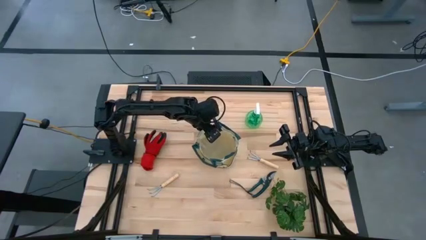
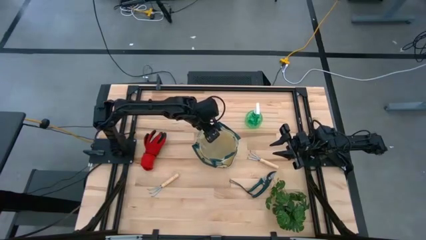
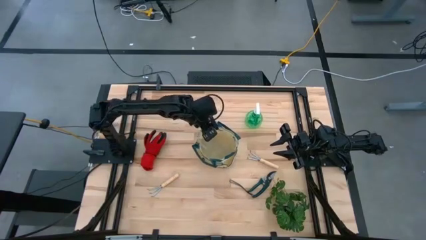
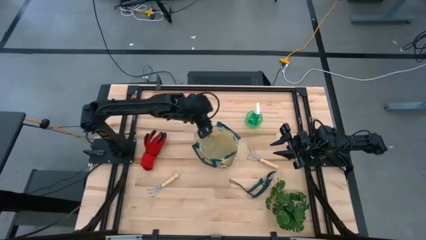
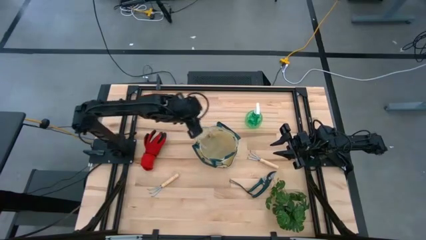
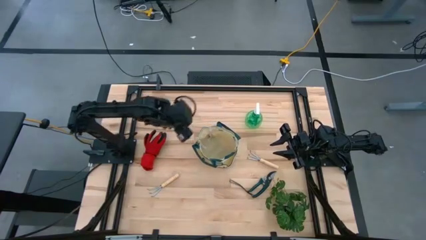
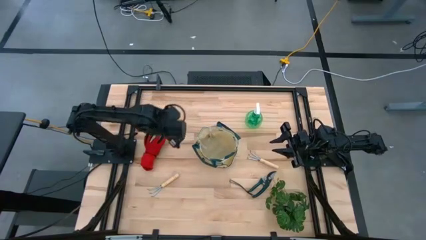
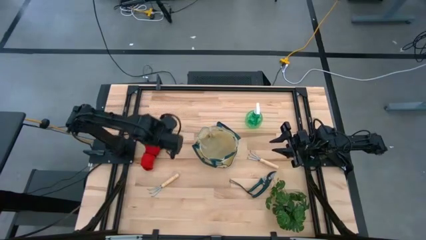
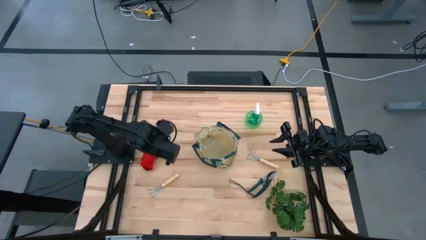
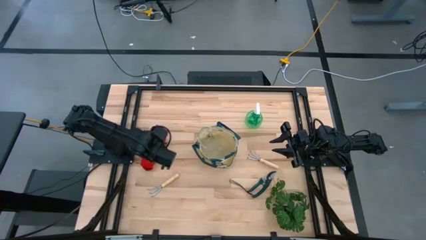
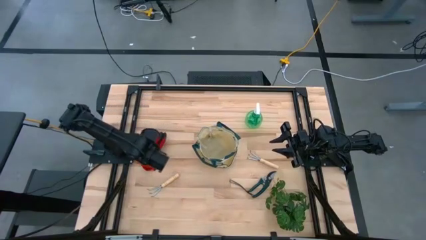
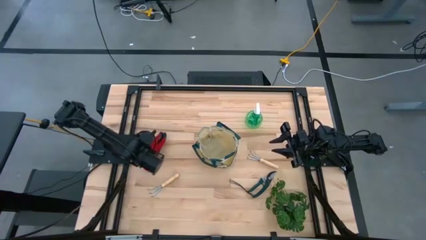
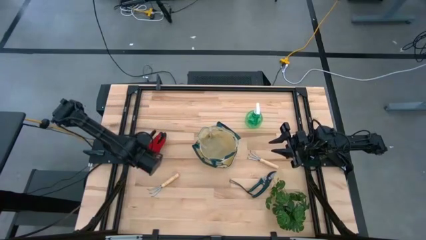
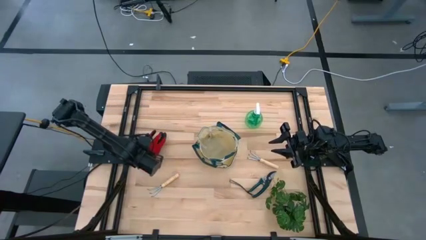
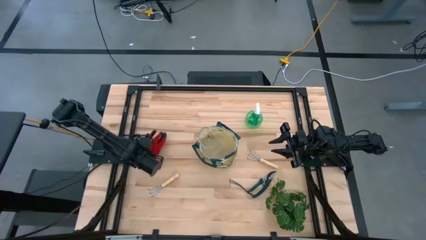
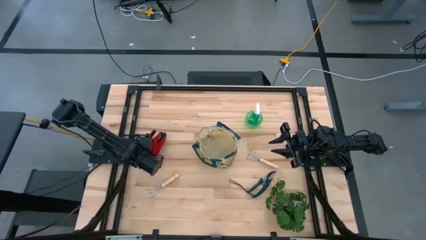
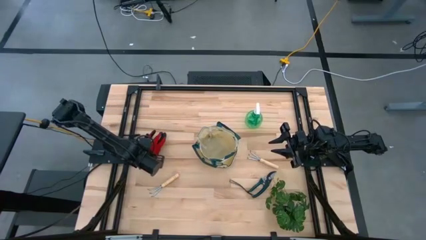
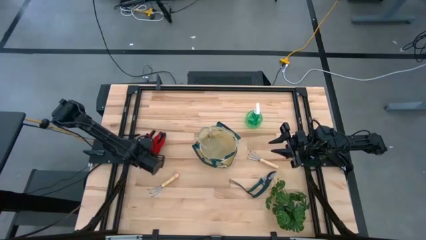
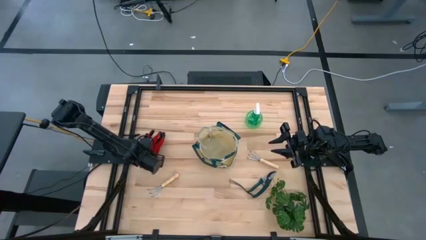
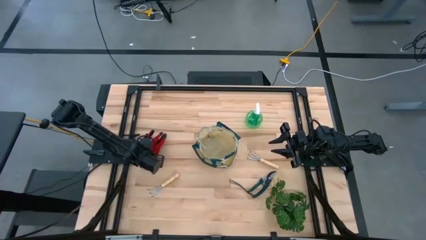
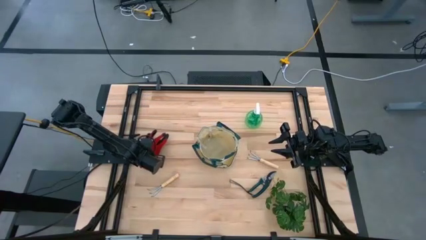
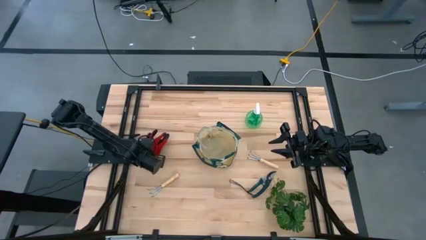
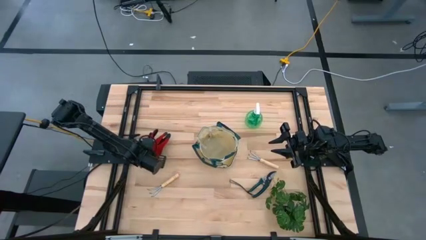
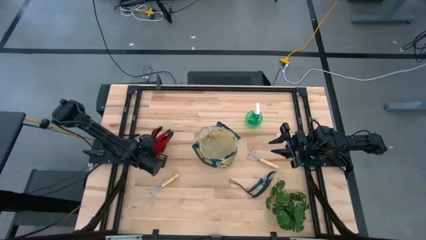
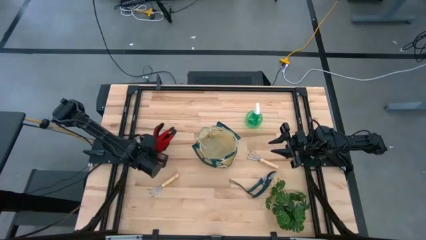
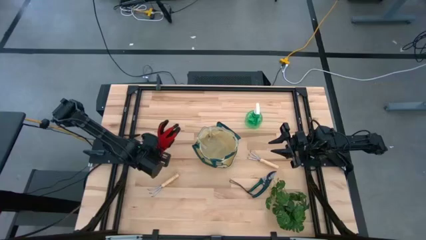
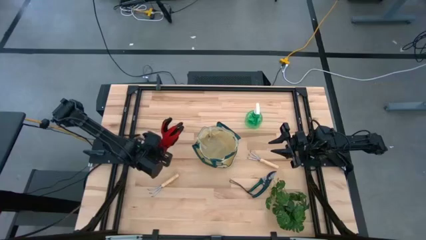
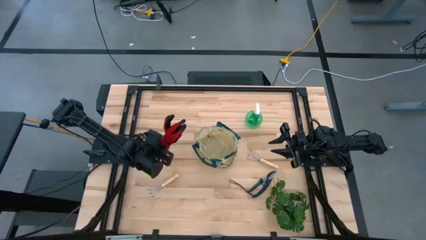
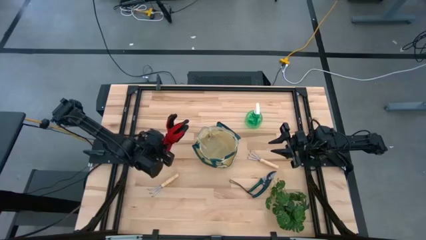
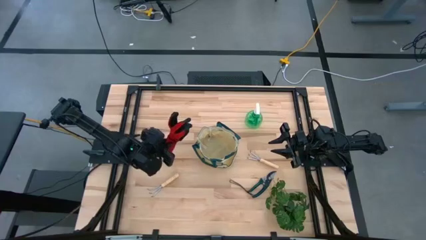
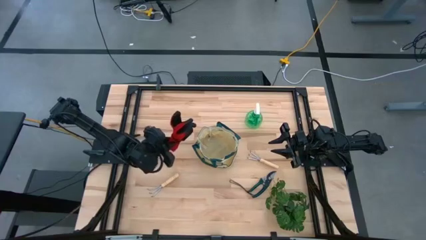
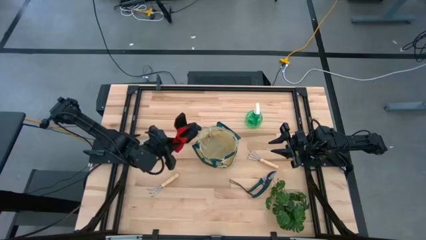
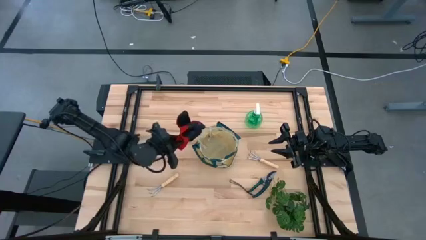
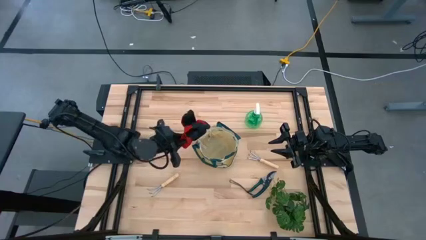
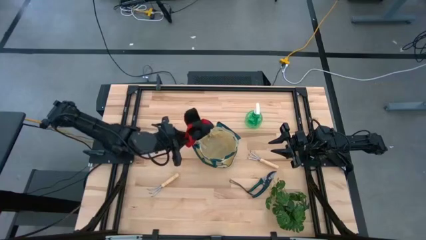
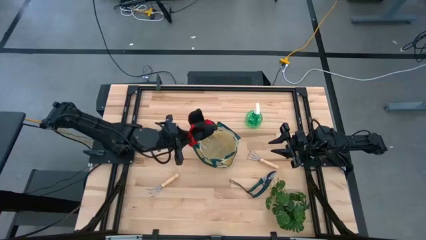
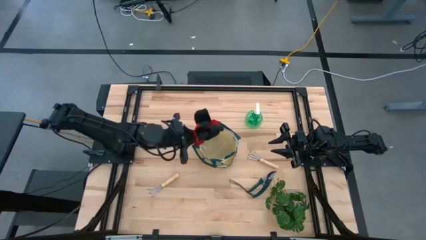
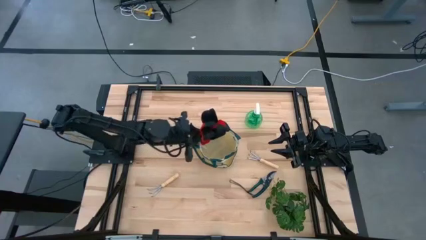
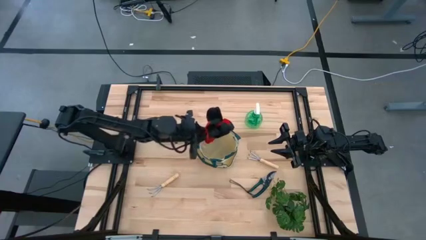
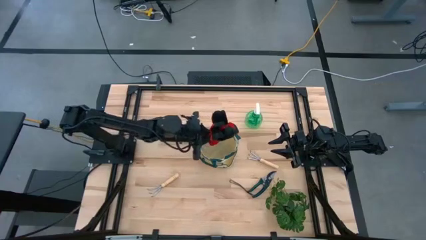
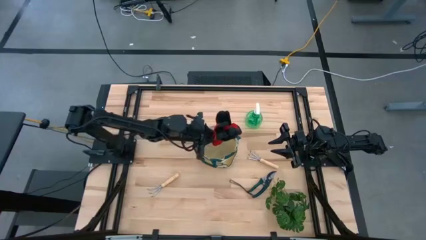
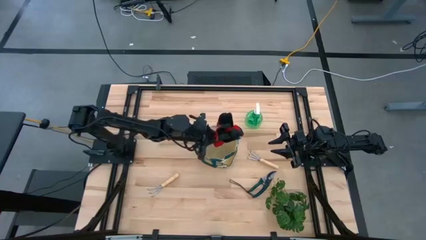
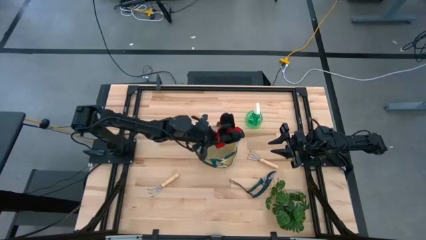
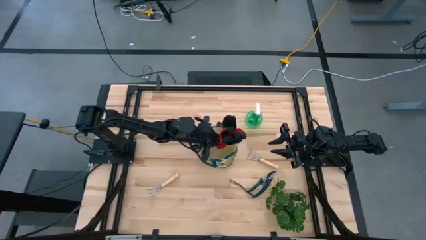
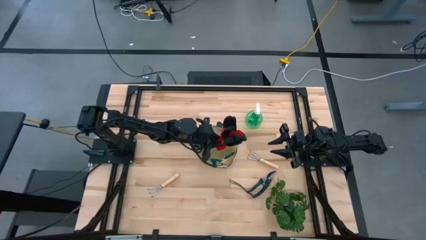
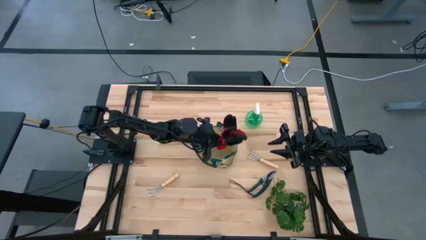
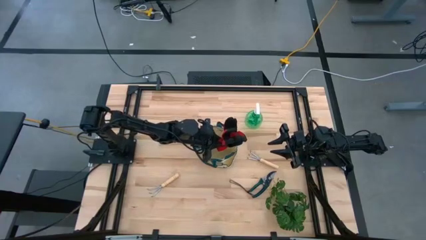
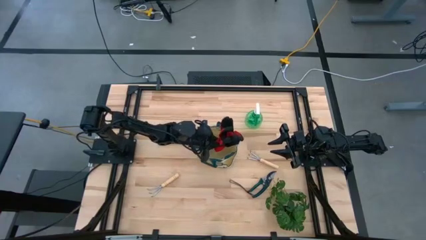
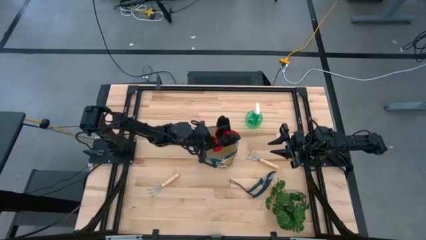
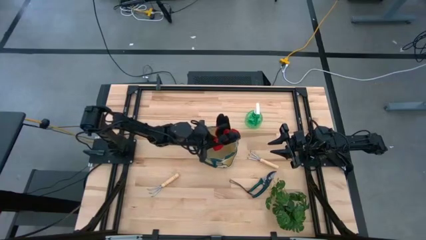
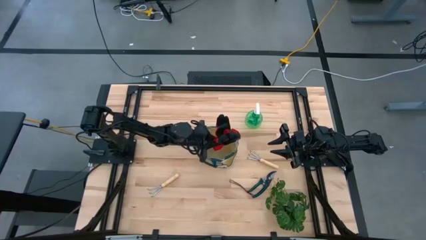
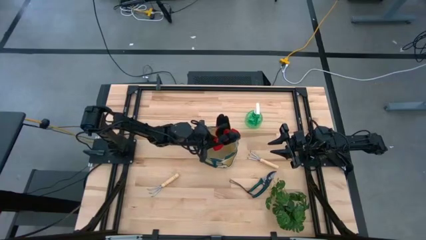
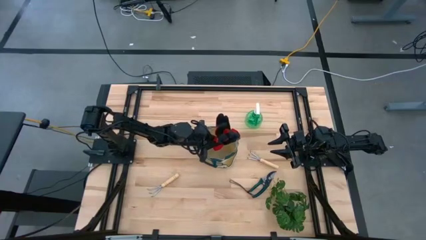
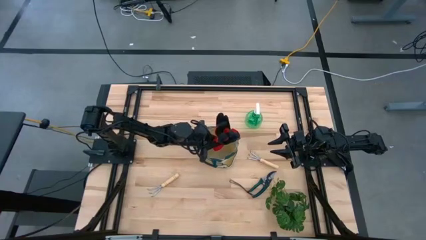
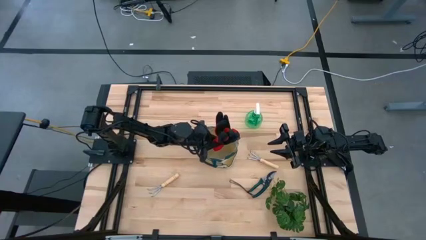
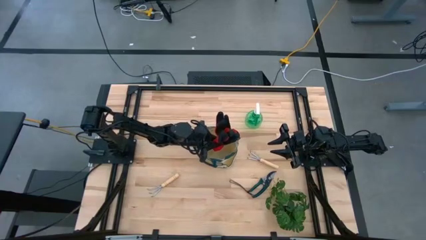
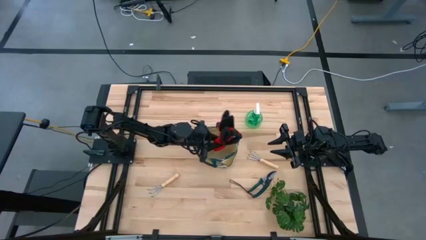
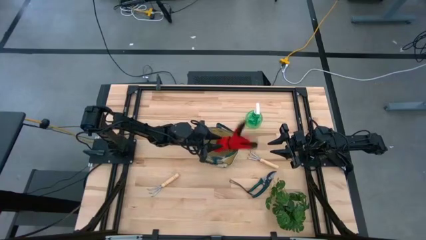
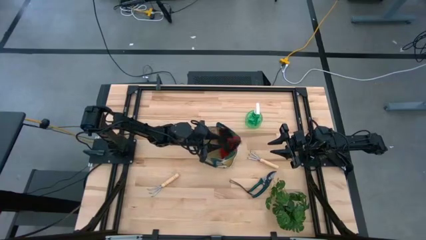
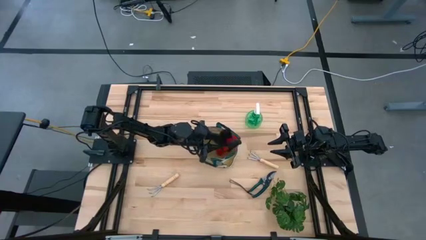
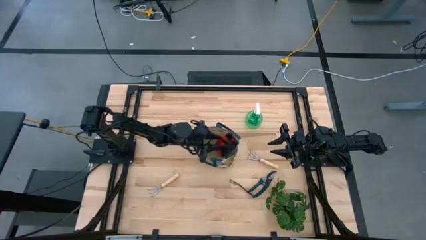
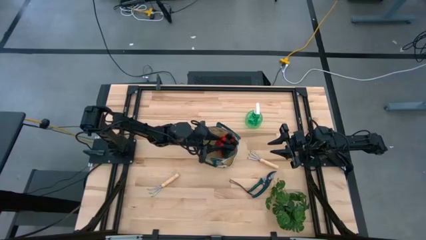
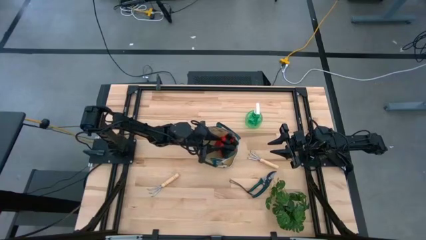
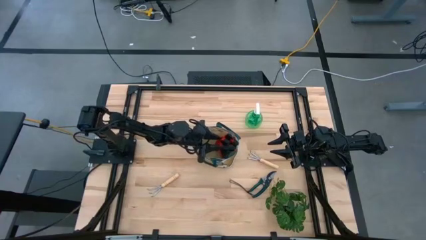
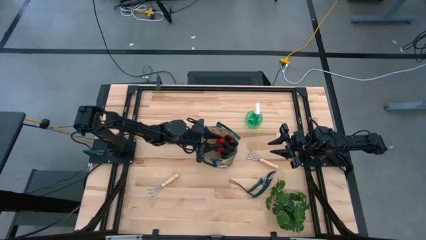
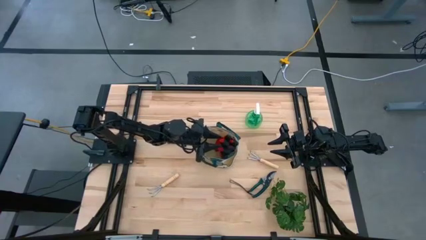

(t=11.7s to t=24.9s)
Task: Pick & Place Garden tools in Gardening bag
Put the red gloves into the green gardening bag
